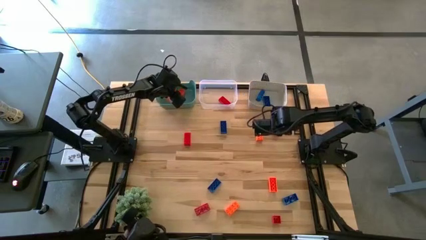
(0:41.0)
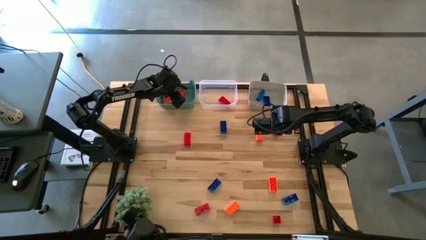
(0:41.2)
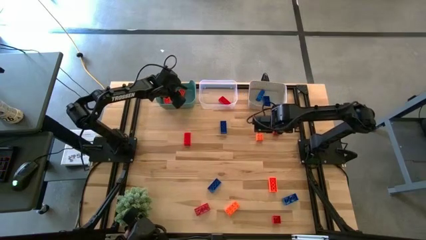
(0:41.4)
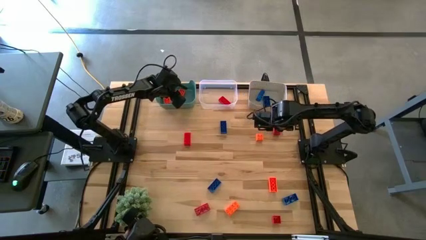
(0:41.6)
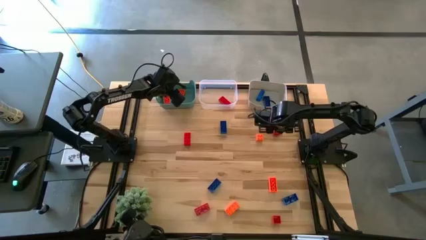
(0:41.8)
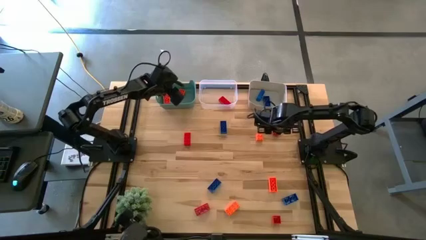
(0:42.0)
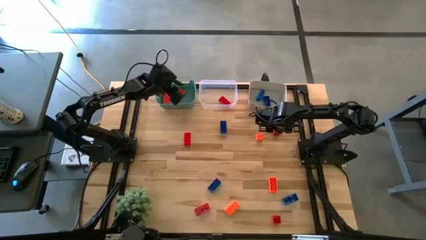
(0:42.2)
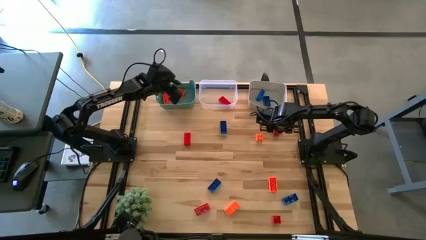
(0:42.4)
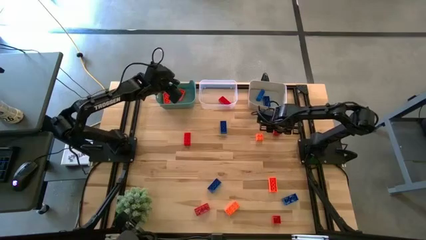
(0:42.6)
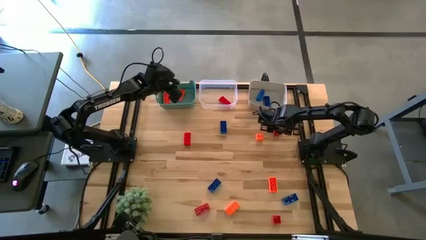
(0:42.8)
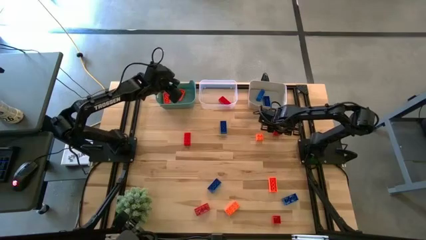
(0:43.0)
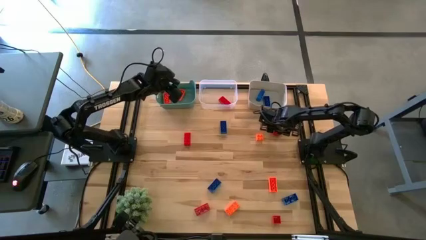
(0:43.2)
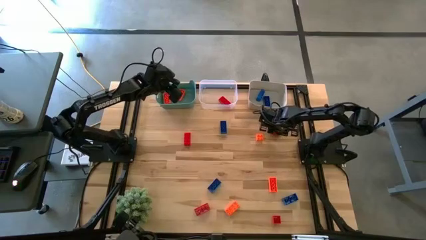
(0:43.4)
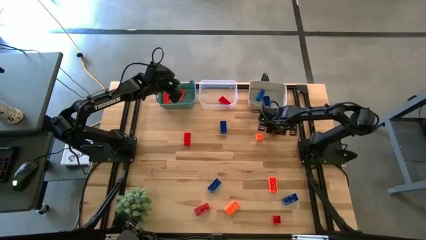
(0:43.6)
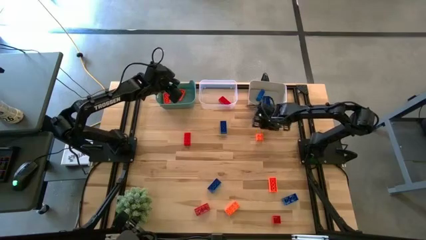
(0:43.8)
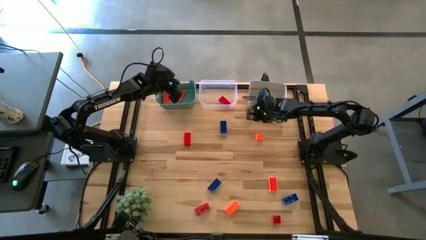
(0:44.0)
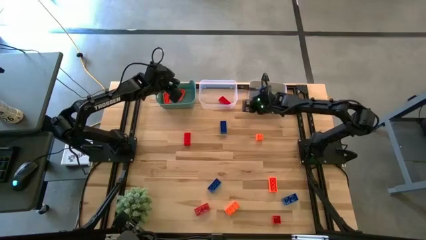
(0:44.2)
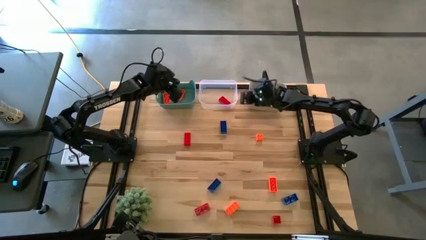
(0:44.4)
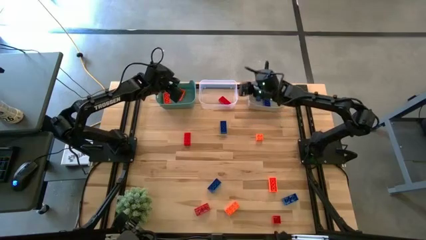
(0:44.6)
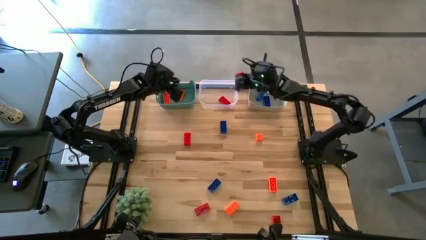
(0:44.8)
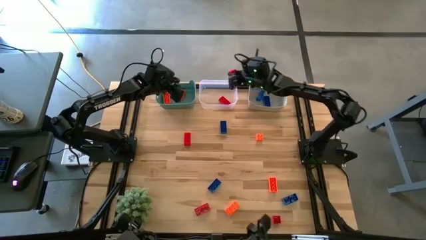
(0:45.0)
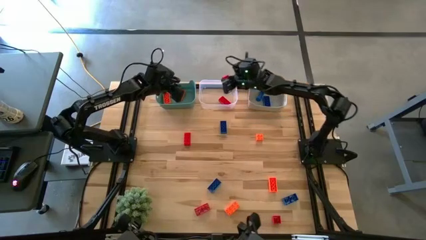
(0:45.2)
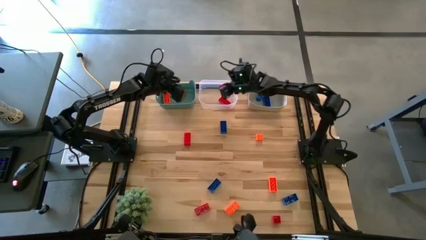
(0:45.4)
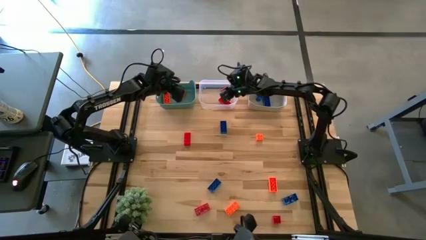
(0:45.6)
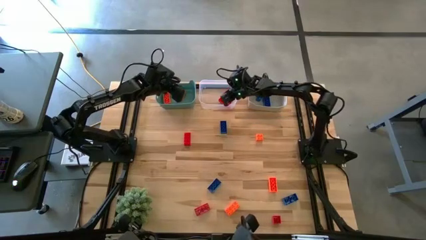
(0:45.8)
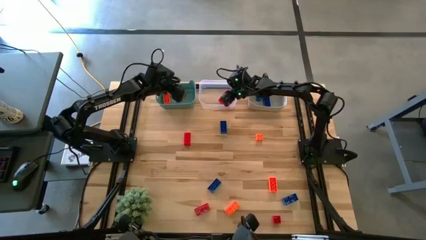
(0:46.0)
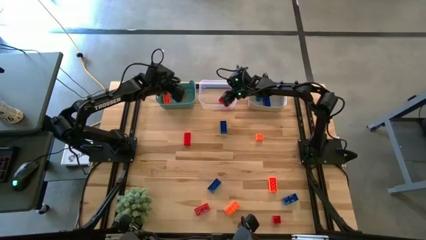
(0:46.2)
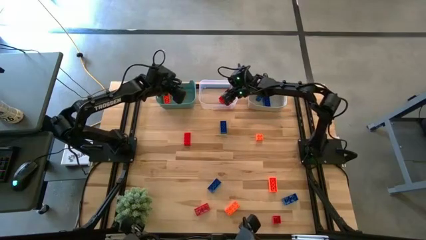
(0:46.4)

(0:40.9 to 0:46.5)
Task: Sort & place blocks by color
Put the red game piece into the transparent bin

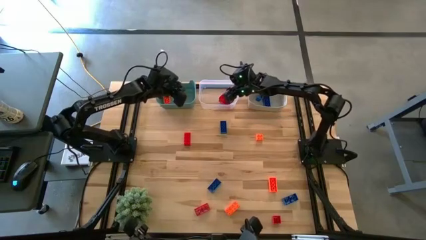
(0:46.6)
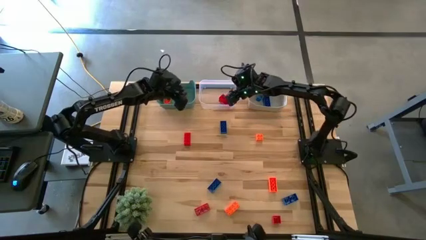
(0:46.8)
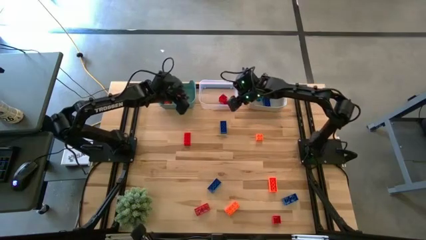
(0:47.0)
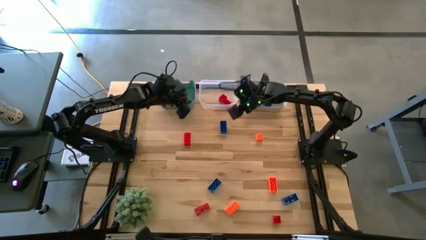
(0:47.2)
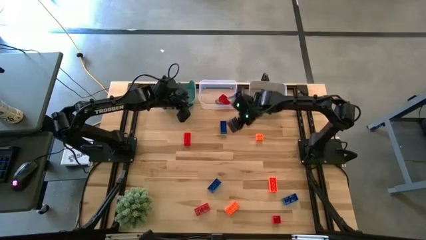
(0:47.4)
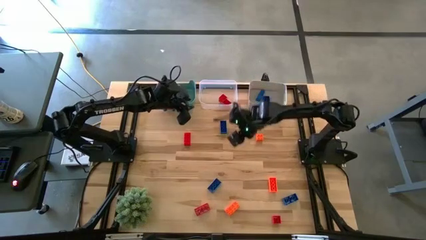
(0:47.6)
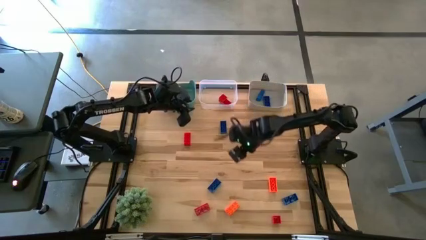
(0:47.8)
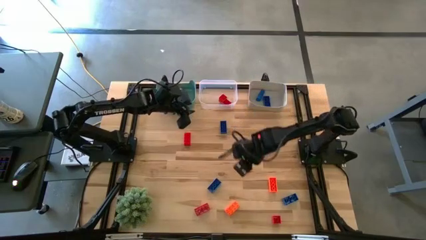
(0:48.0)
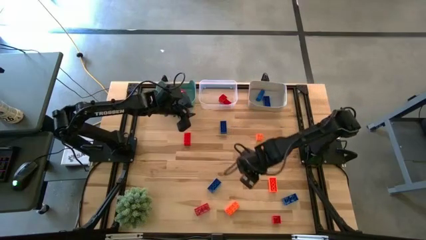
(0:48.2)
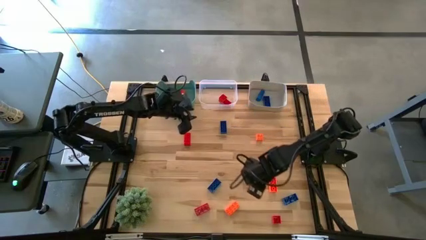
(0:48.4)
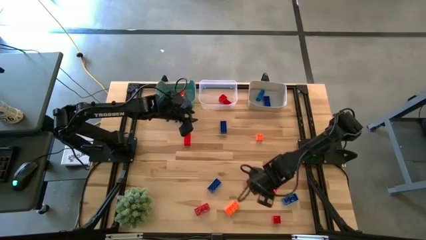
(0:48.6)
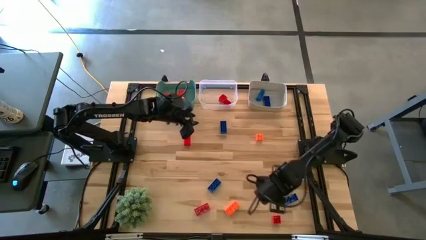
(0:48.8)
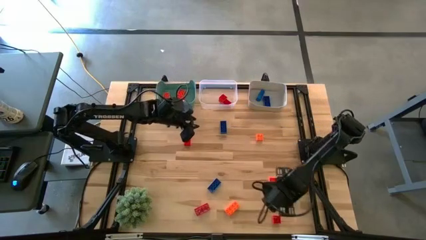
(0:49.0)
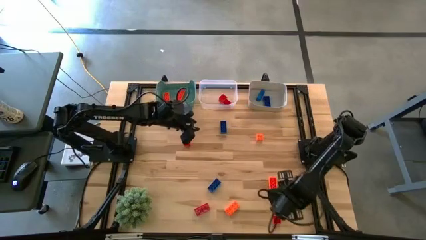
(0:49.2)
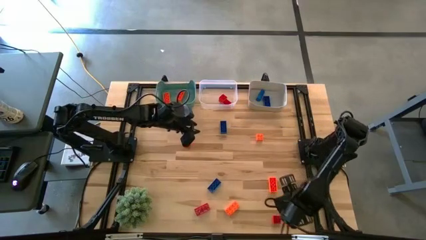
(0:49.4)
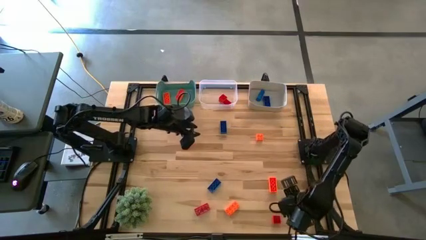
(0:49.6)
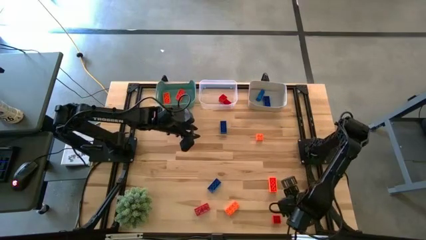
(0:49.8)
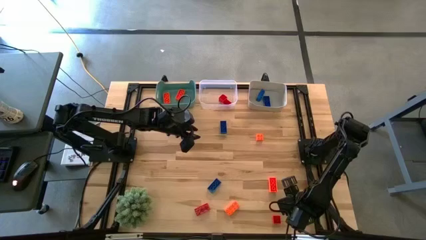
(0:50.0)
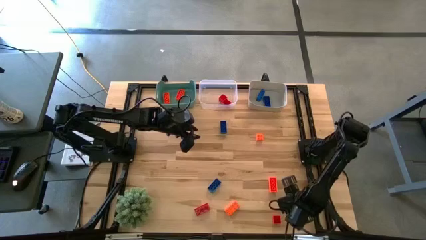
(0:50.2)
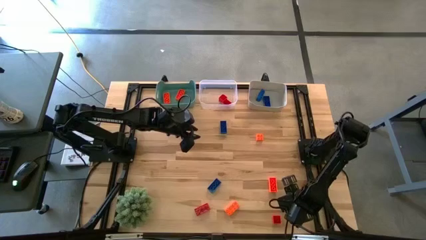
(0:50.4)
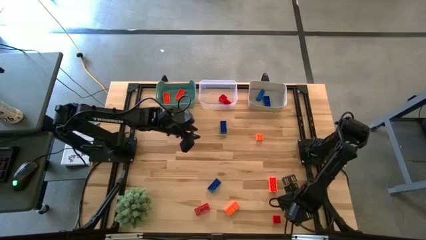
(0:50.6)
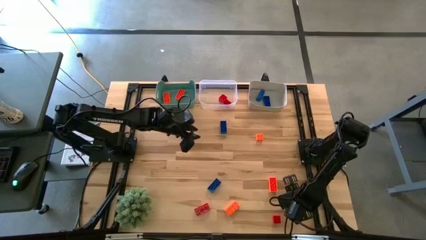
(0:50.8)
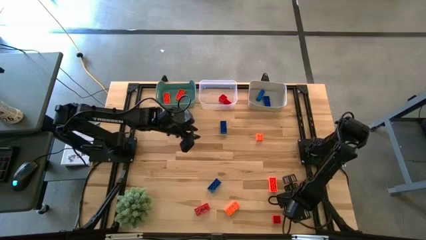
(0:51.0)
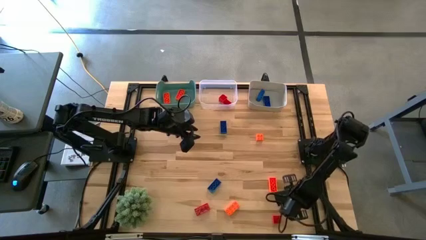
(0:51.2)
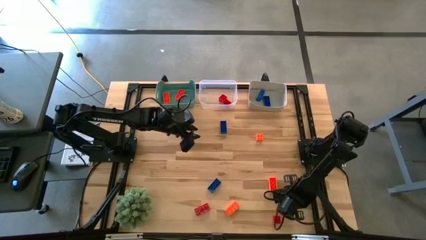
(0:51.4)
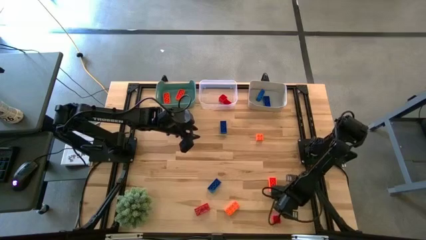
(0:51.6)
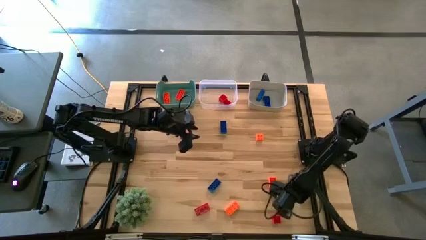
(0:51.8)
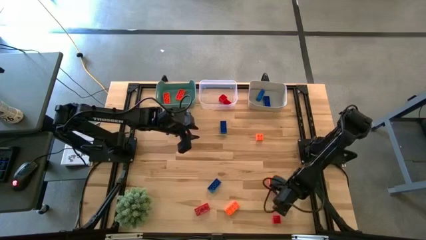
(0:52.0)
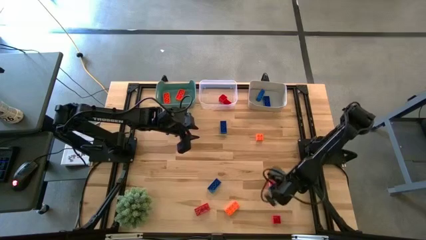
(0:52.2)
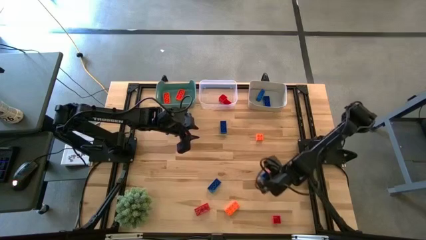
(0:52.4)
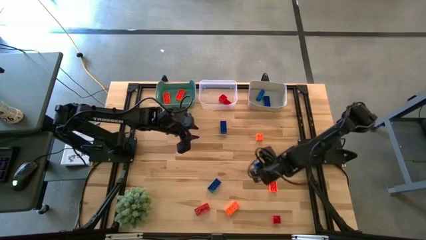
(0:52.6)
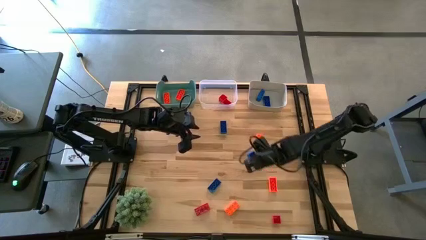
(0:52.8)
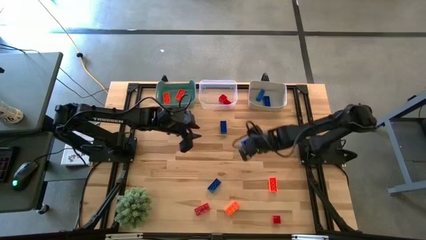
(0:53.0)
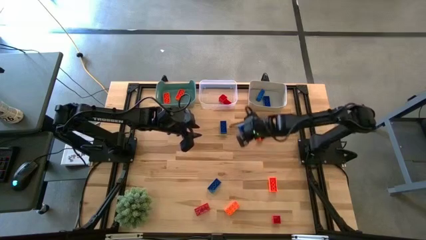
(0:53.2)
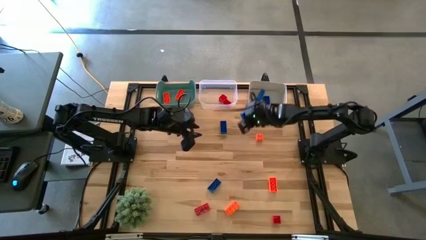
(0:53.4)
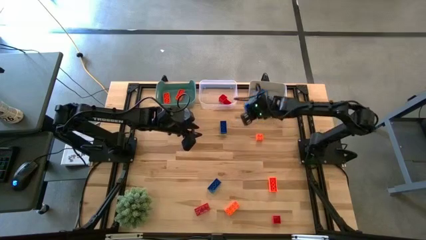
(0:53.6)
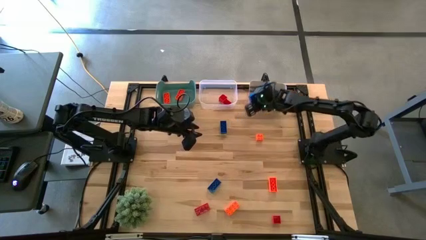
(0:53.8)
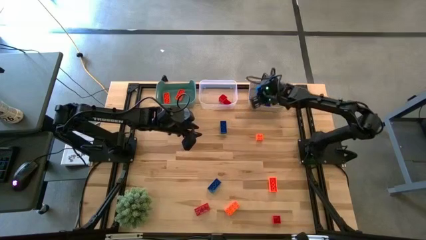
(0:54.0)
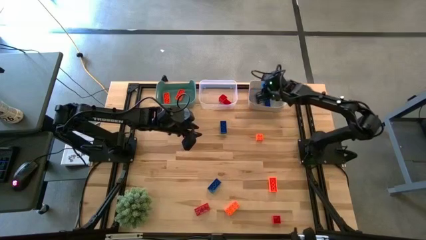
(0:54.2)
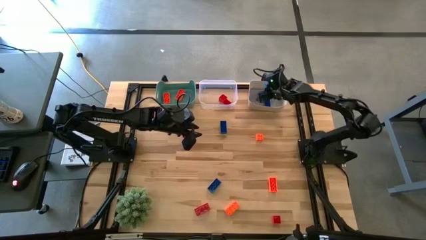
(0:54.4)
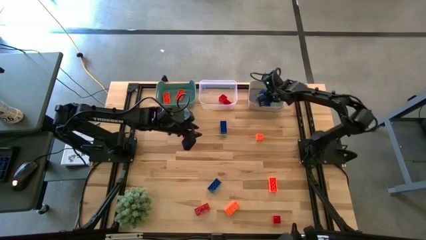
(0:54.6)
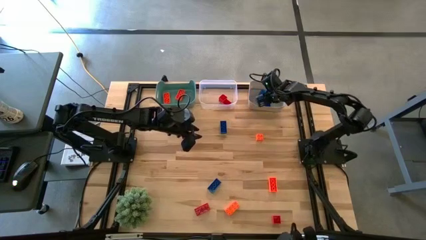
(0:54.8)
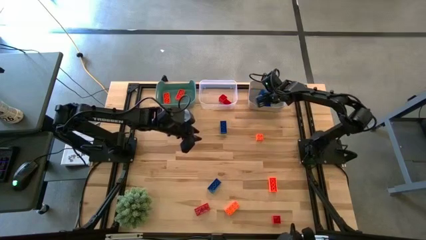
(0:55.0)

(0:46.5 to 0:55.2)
Put the blue game piece into the gray bin

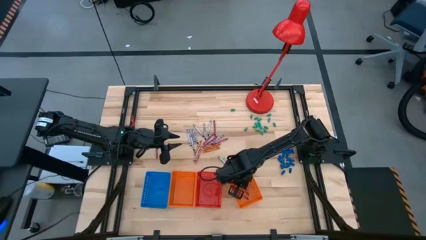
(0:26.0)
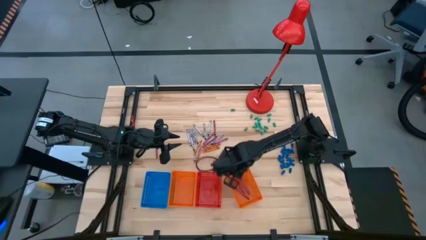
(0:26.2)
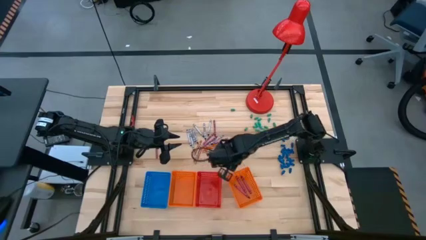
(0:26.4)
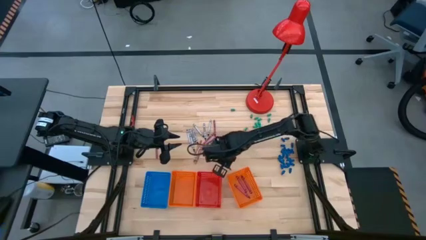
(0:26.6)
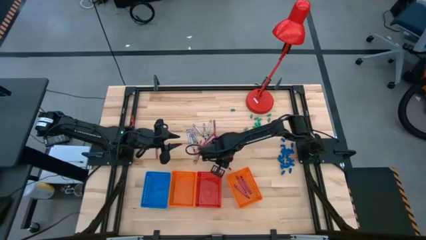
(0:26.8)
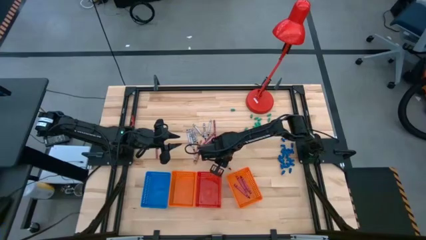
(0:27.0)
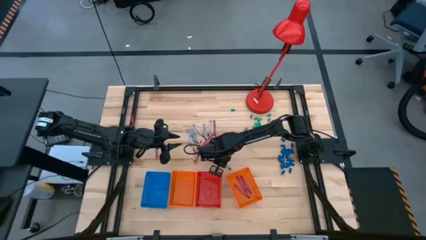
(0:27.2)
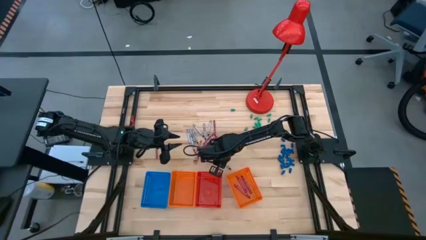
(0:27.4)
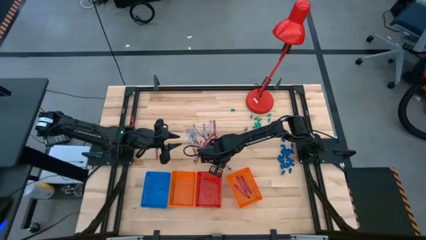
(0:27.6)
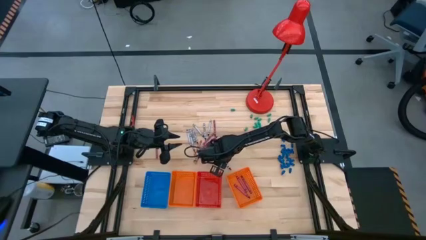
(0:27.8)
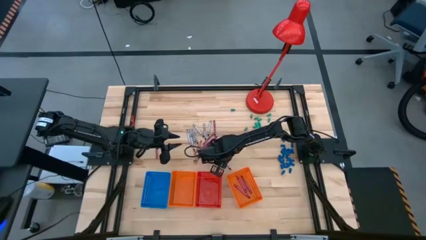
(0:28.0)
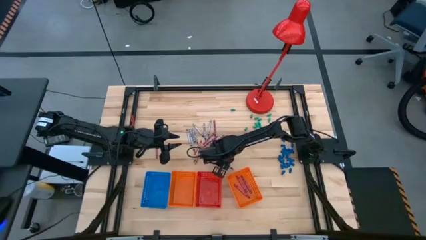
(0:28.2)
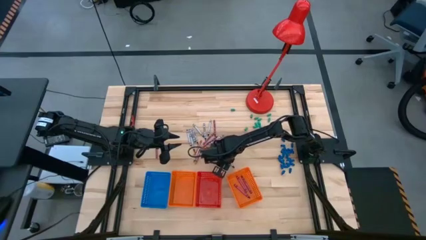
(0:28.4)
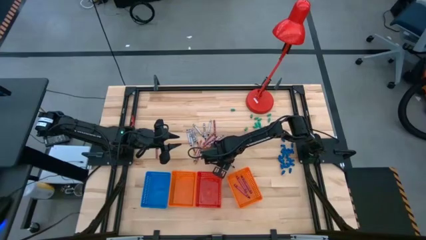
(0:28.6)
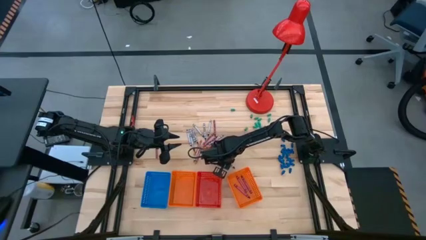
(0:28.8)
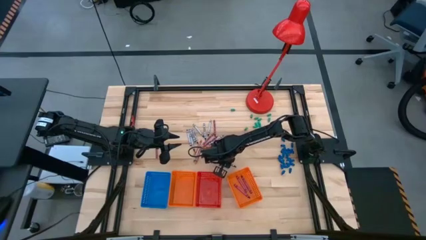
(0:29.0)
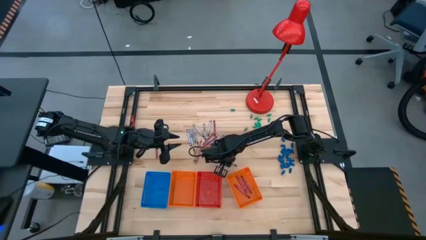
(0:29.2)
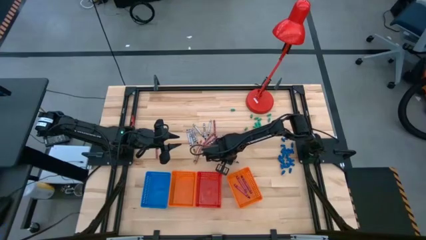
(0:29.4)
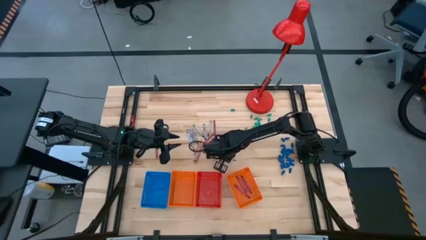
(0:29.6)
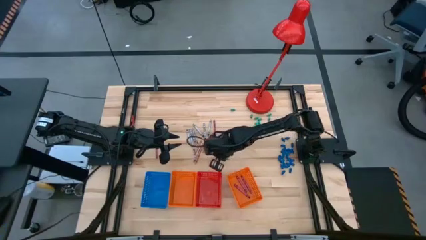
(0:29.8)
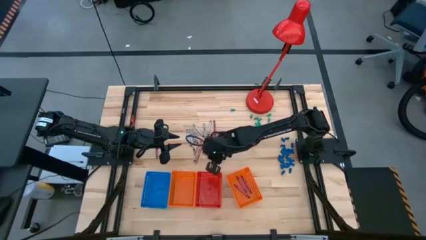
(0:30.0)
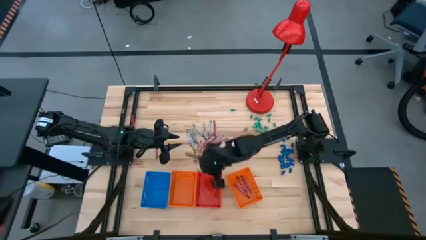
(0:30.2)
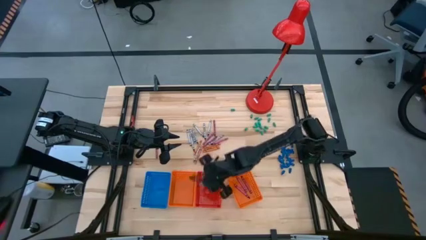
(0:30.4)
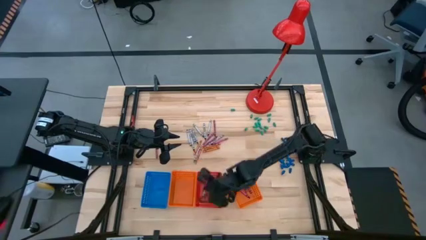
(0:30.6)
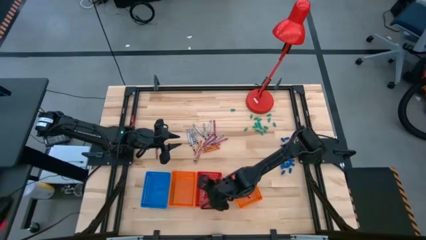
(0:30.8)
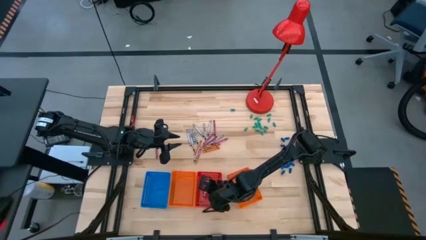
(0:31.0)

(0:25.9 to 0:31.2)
Task: Sort crayons
Put the black crayon into the red bin
